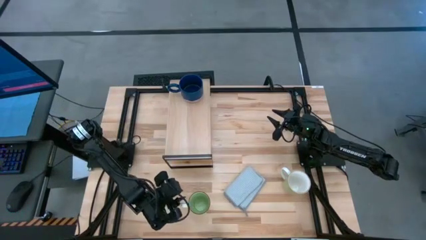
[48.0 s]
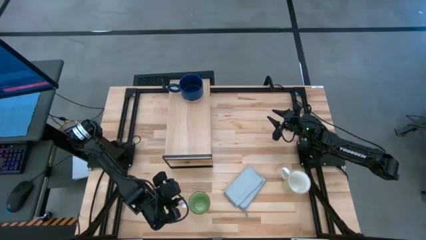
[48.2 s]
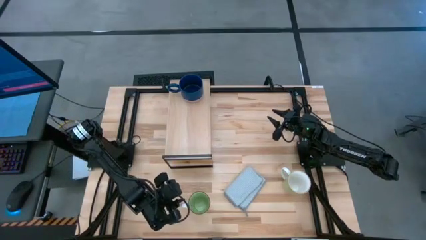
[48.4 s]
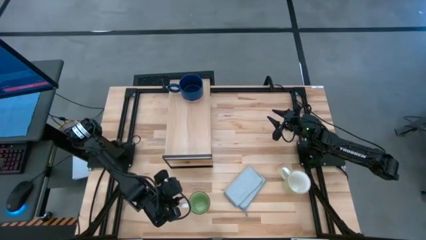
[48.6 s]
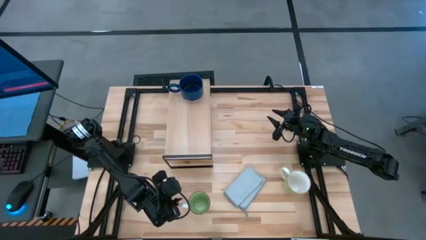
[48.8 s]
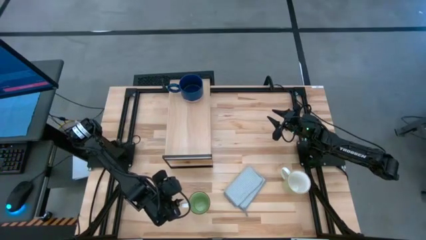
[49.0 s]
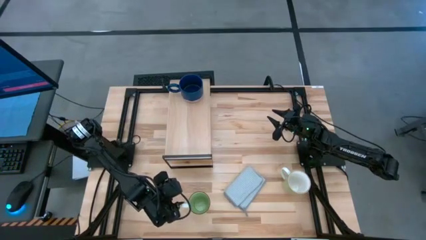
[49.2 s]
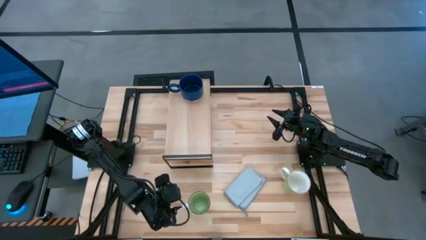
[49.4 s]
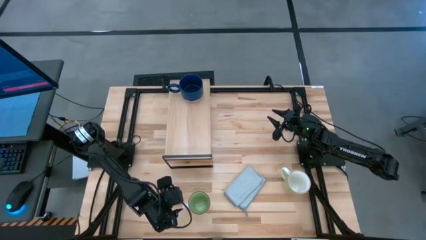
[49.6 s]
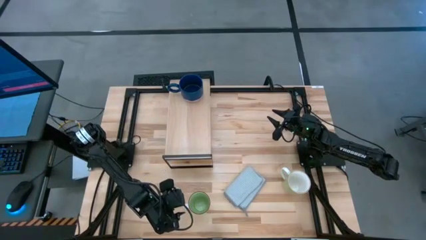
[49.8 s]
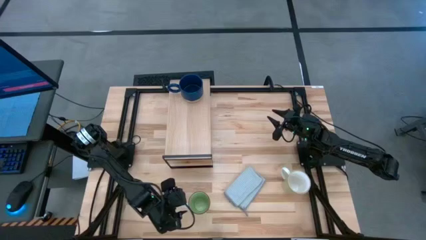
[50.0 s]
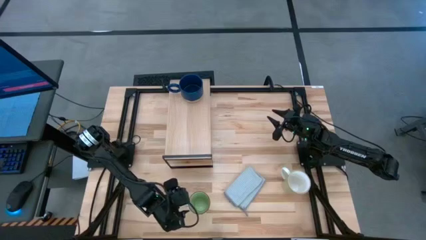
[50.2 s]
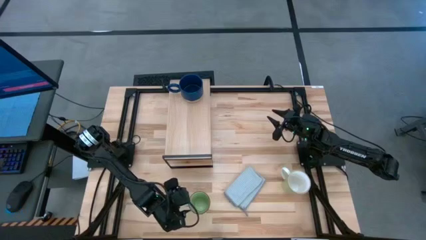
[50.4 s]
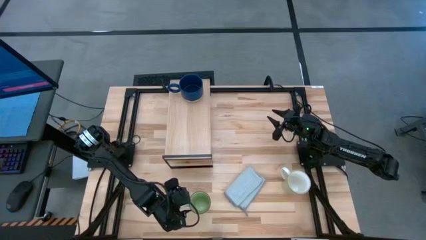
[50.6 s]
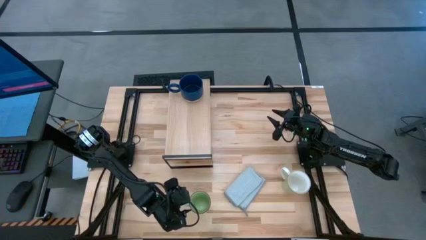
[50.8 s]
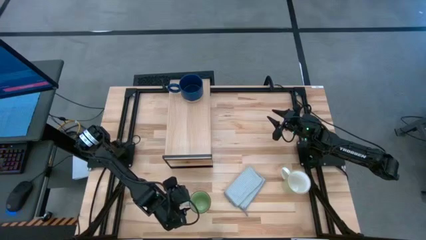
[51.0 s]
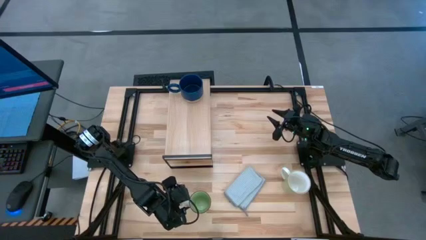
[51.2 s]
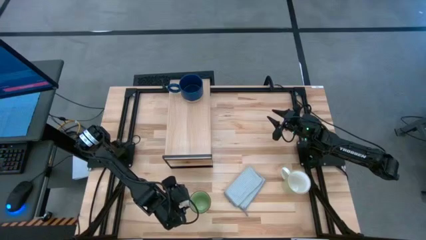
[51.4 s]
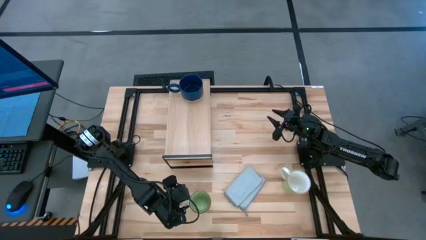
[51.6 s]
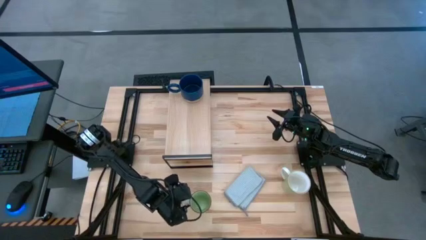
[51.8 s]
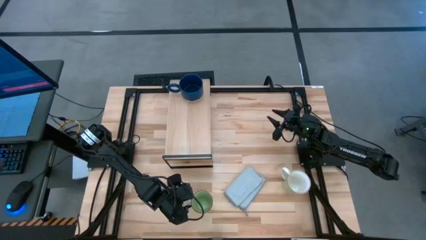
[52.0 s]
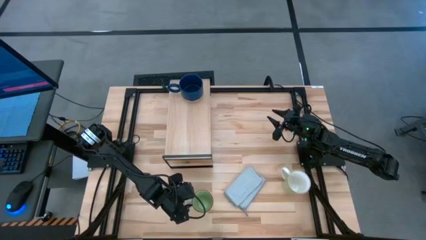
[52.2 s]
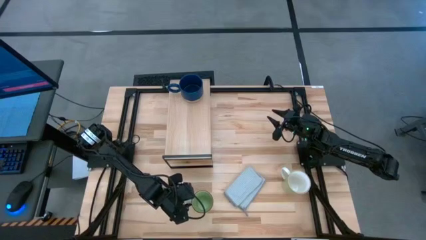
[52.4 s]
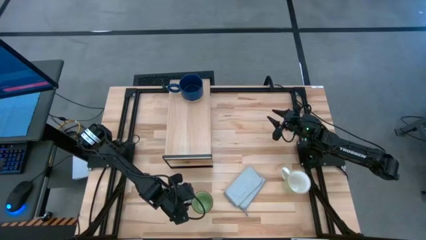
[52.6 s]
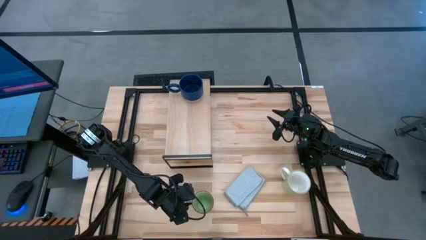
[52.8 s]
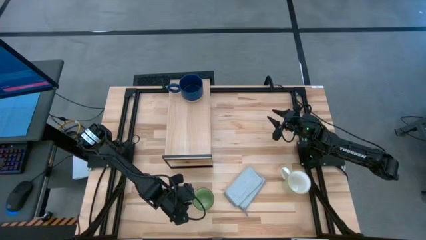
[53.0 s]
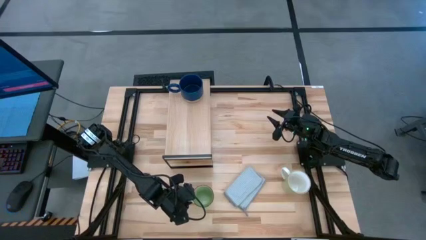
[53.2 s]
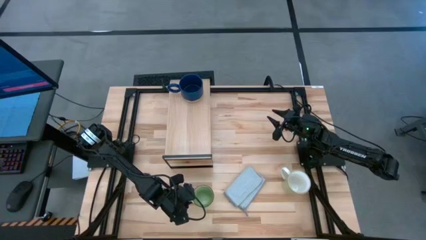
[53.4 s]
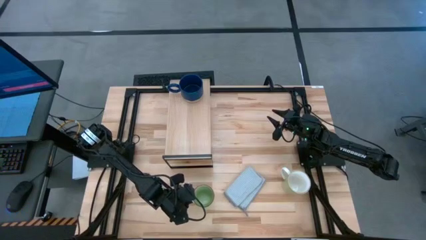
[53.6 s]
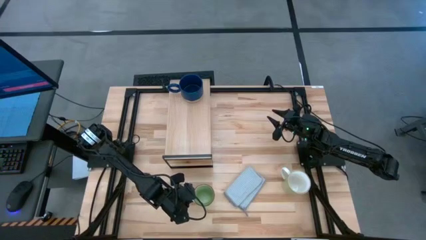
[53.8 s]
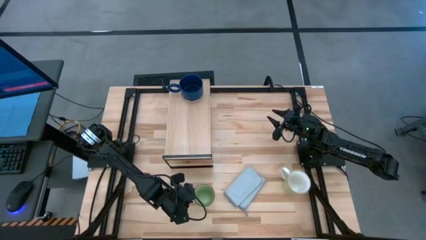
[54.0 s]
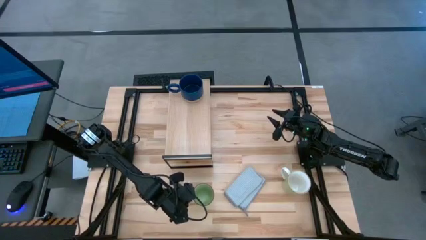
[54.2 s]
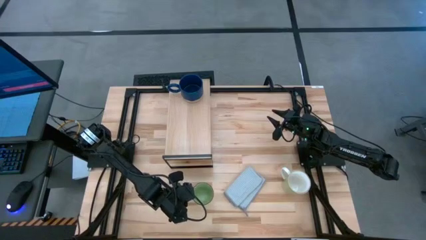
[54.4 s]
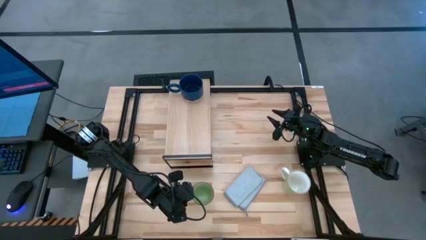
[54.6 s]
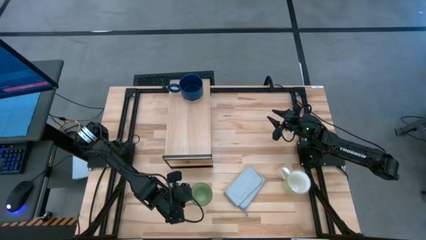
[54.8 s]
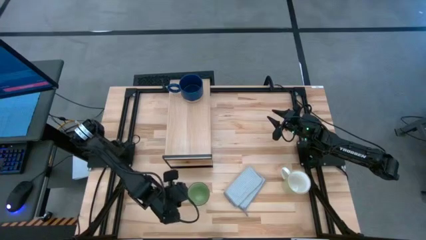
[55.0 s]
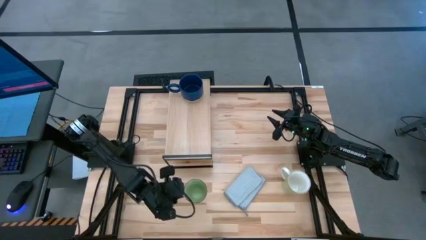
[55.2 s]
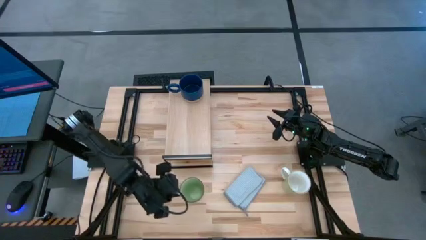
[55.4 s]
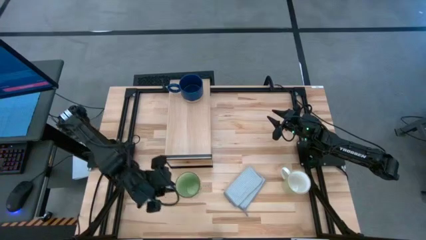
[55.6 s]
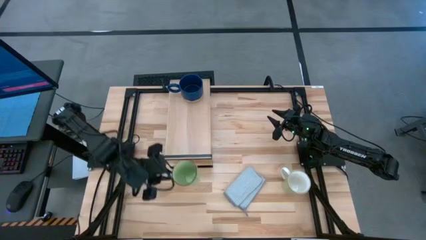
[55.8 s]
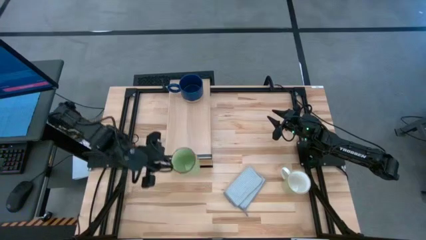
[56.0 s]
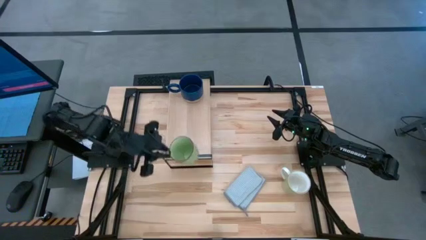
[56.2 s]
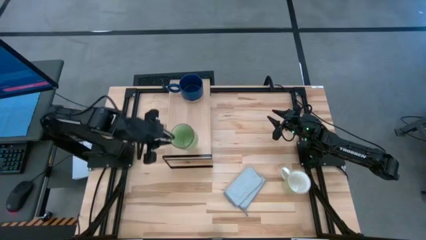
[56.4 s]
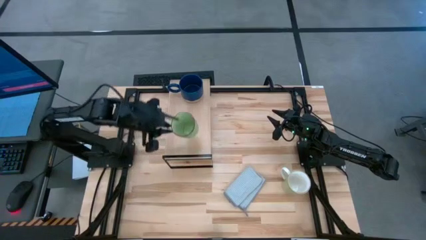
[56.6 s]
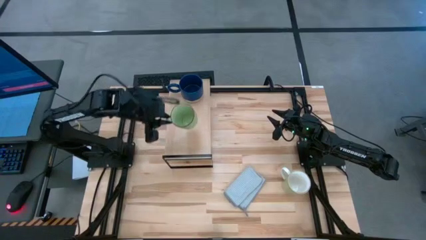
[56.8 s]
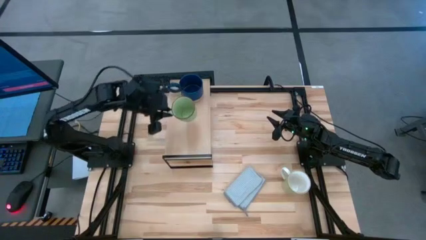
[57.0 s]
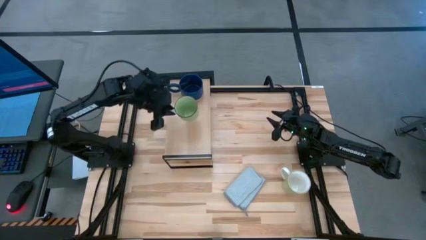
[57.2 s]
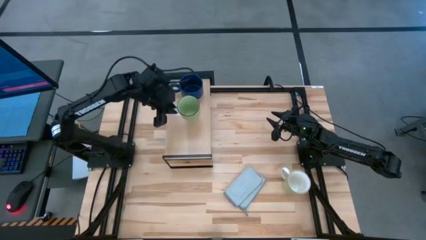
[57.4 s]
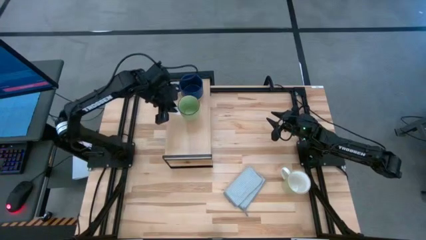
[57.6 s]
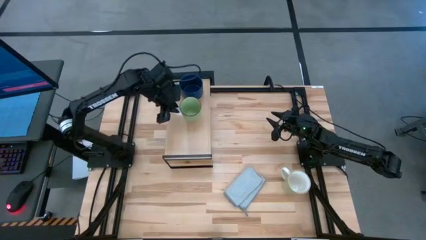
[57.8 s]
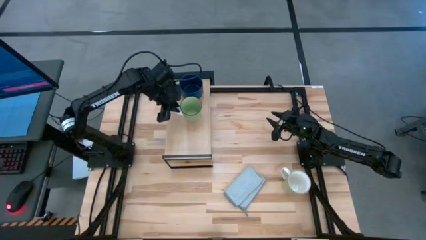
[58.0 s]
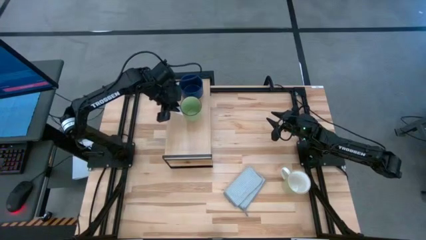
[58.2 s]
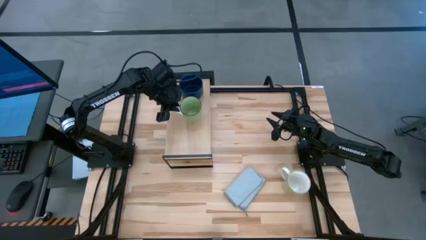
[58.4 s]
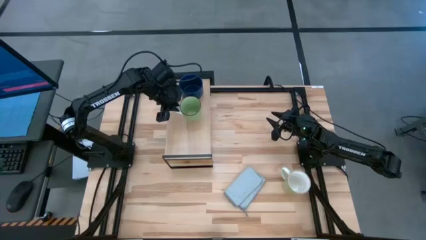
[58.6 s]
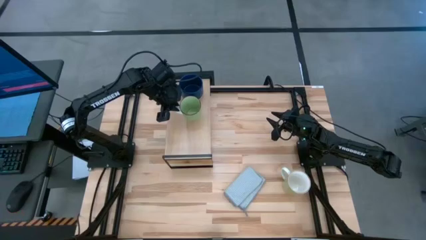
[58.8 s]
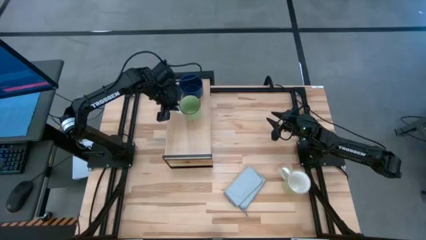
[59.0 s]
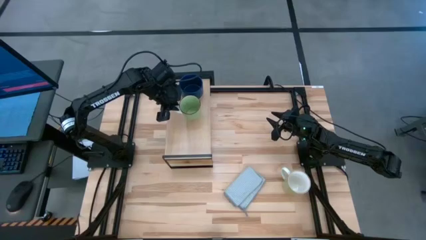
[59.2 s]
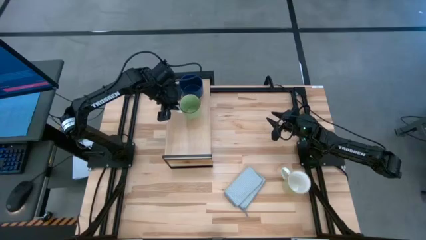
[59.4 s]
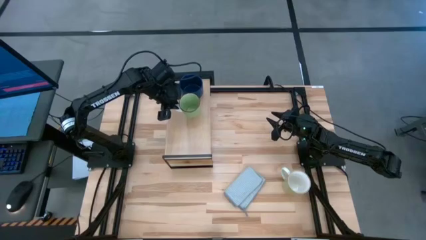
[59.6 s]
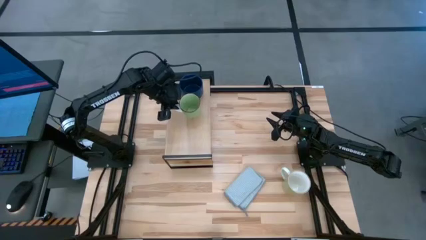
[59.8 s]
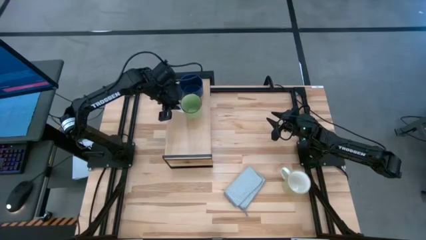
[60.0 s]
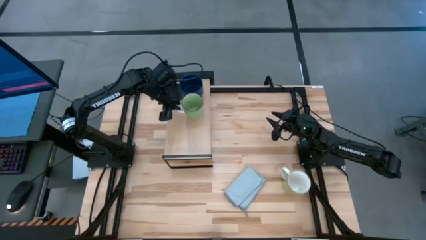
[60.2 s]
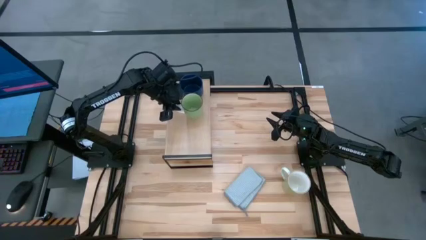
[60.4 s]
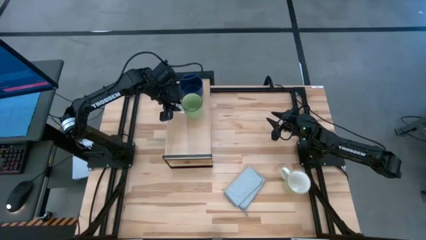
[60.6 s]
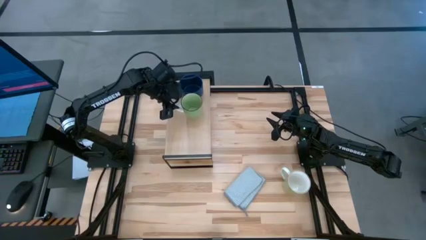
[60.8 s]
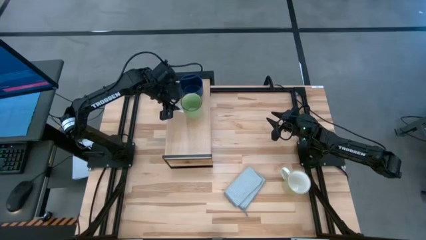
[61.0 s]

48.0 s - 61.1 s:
Task: Stack small to large cups/mugs on shelf
Put the white green mug on the shelf

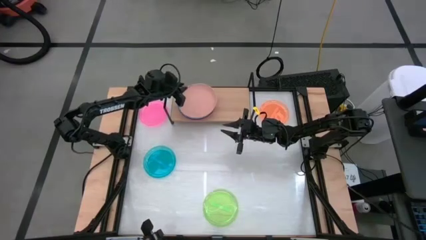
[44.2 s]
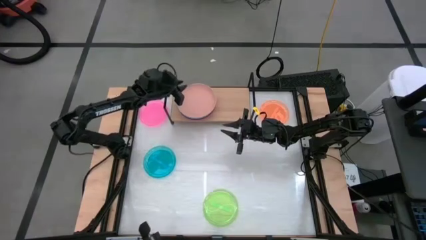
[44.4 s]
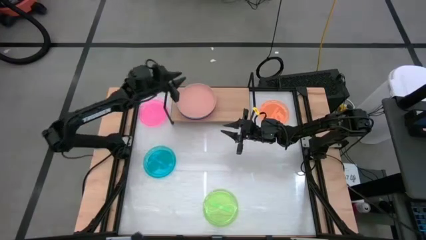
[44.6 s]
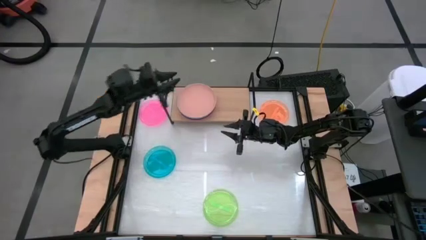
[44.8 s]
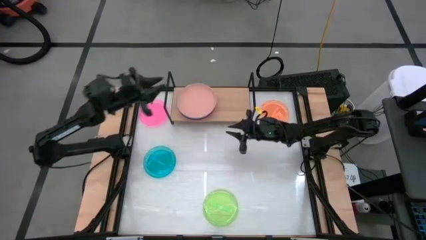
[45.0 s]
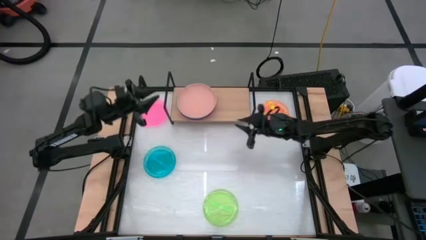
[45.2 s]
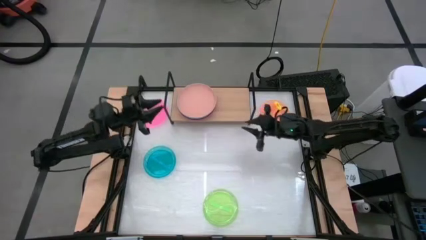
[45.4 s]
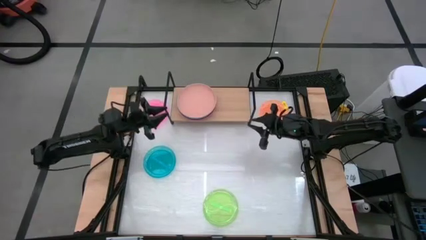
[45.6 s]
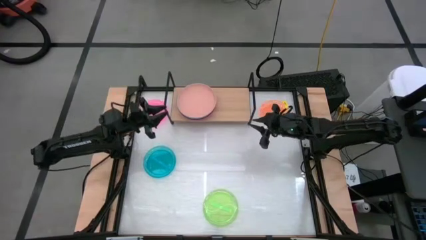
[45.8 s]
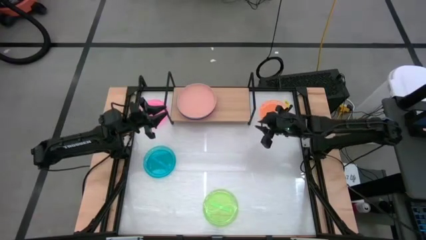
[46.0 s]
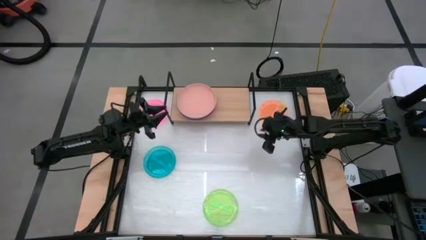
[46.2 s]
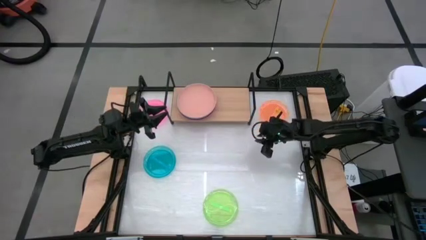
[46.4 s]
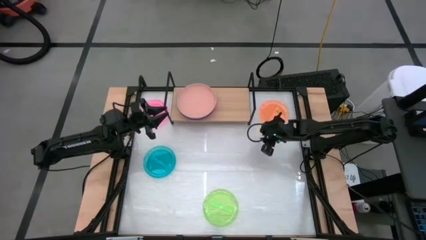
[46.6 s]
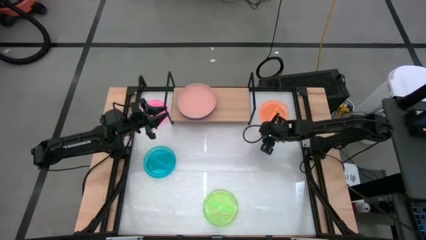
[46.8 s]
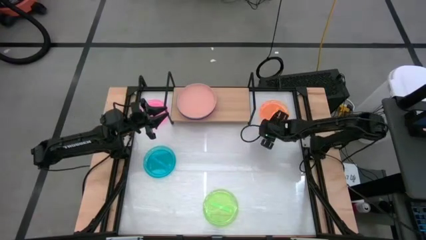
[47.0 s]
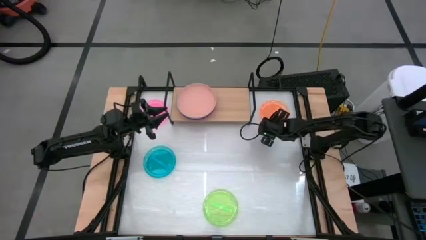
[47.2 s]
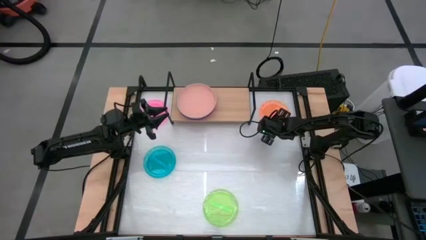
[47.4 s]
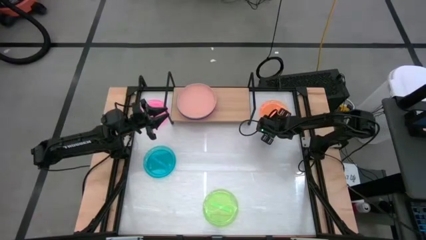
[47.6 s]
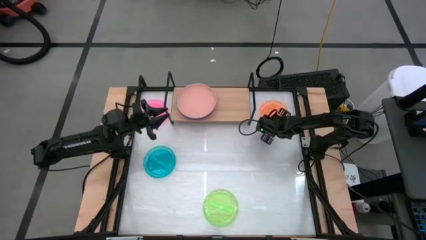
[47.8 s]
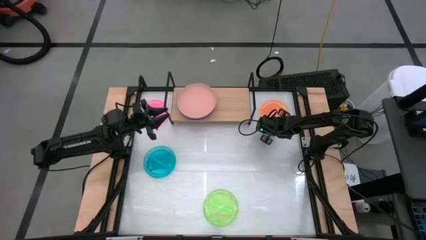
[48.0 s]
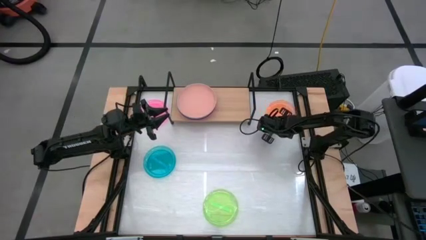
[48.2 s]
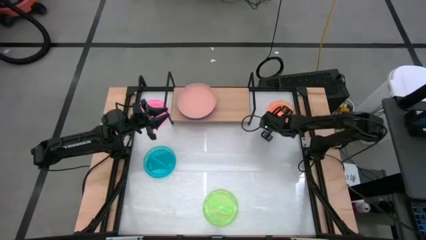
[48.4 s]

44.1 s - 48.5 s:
Task: Place and stack plates onto a shelf
Put the orange transparent plate on the shelf
